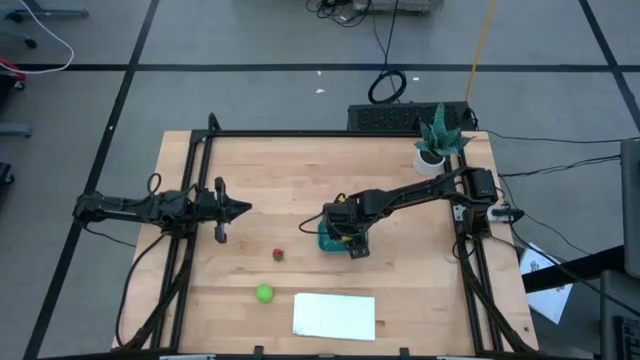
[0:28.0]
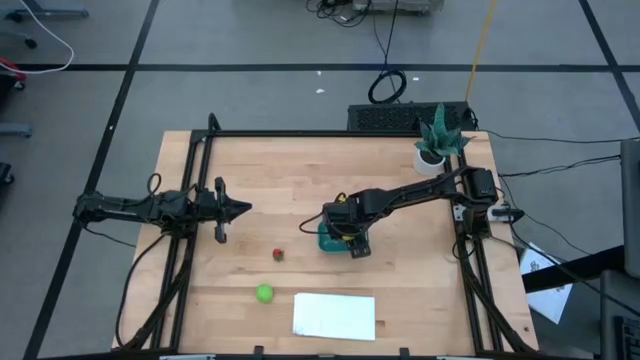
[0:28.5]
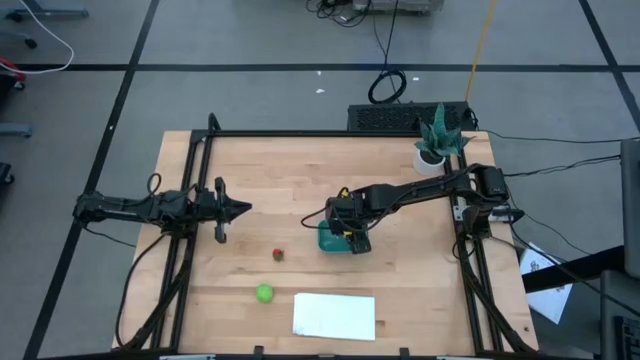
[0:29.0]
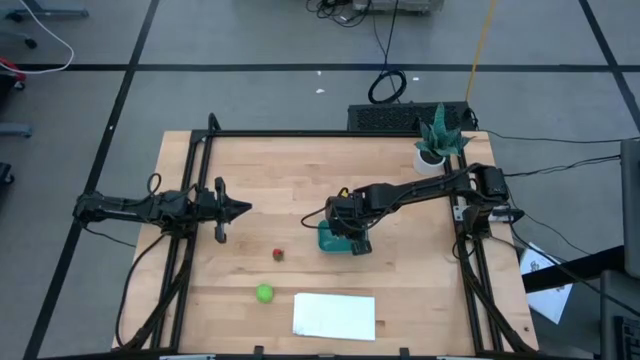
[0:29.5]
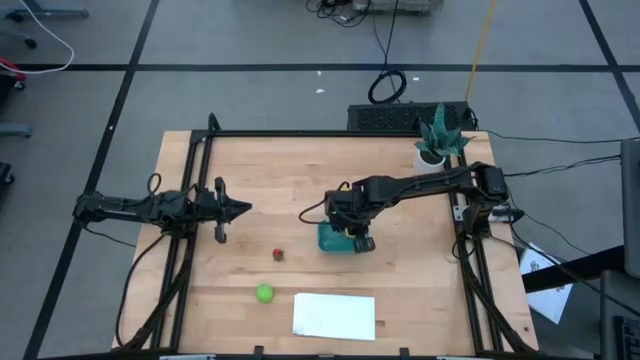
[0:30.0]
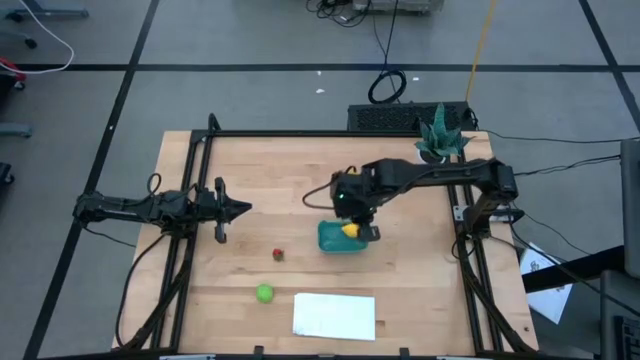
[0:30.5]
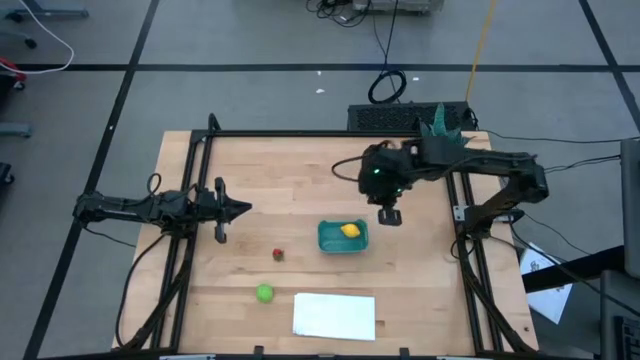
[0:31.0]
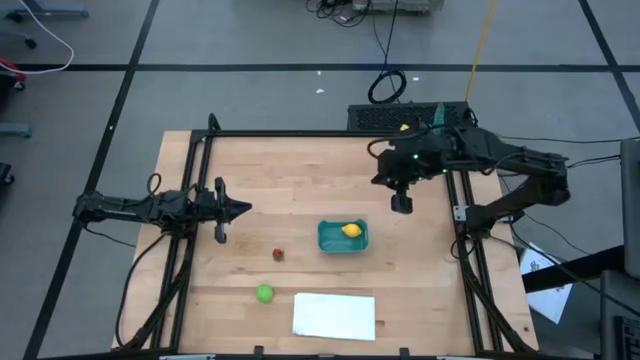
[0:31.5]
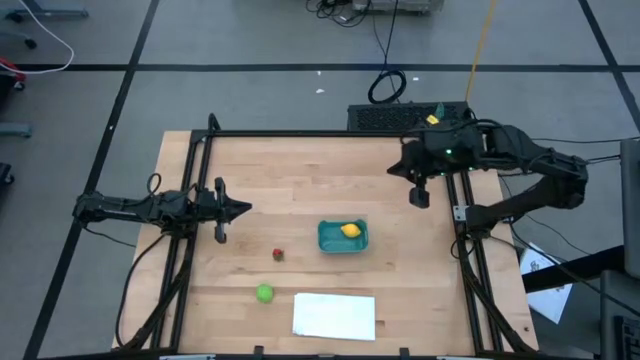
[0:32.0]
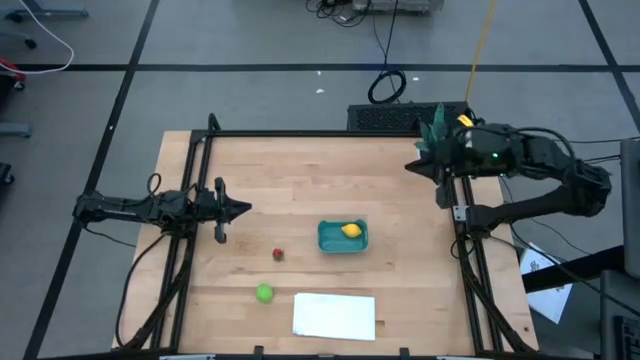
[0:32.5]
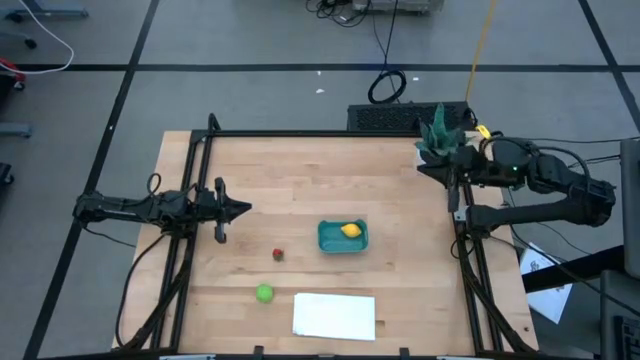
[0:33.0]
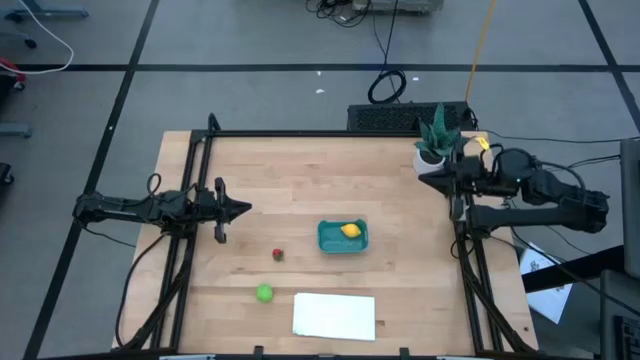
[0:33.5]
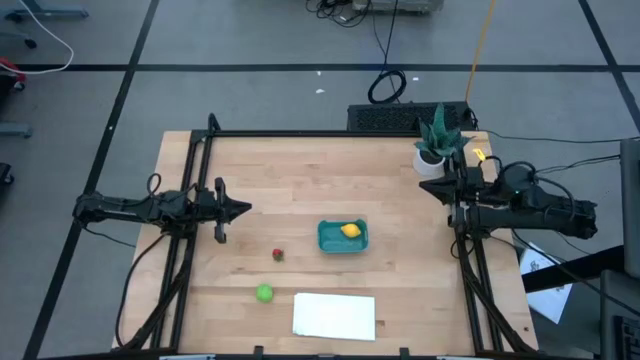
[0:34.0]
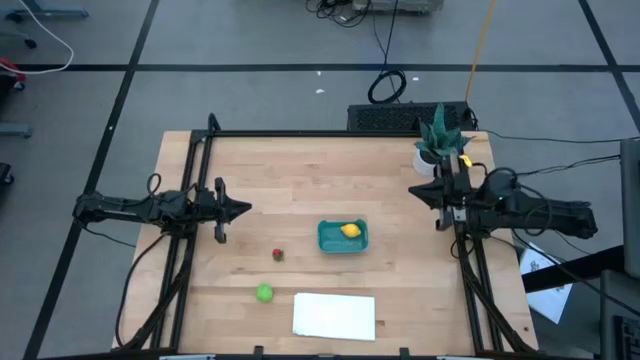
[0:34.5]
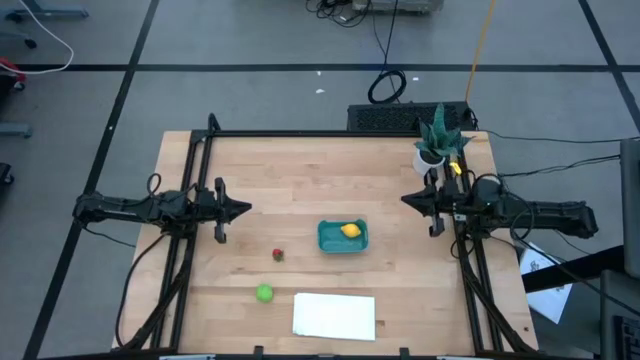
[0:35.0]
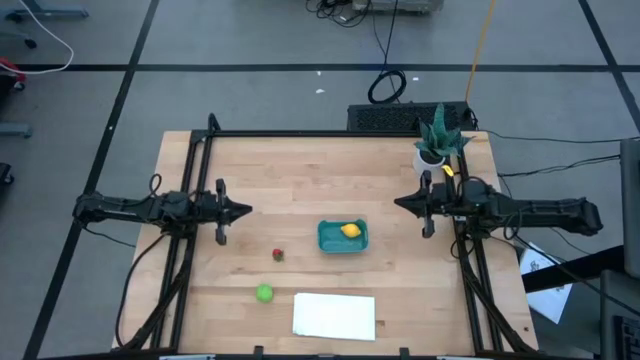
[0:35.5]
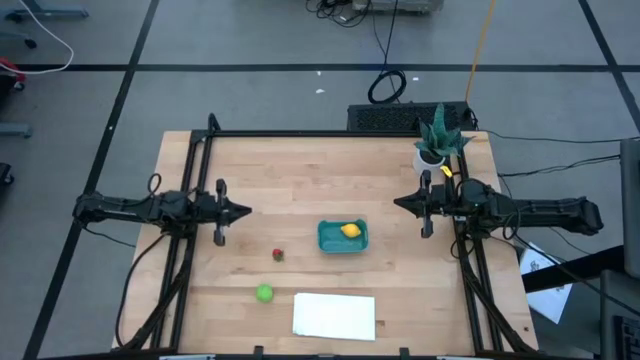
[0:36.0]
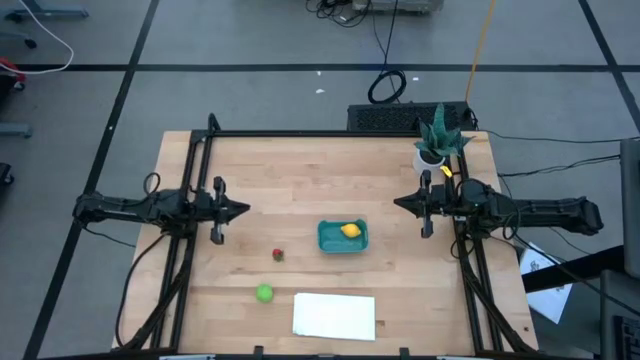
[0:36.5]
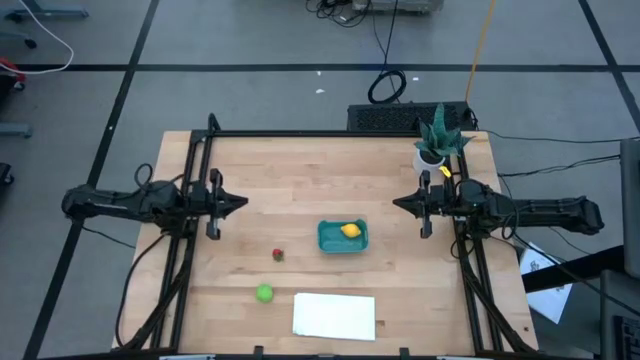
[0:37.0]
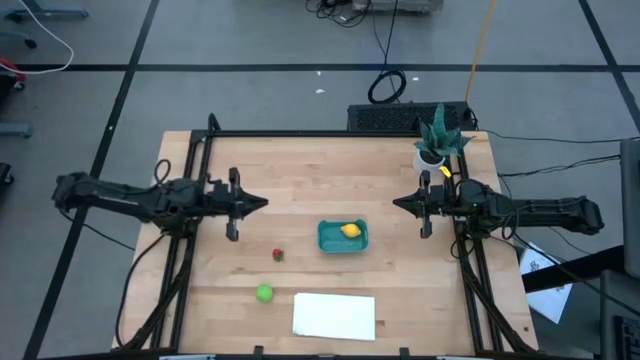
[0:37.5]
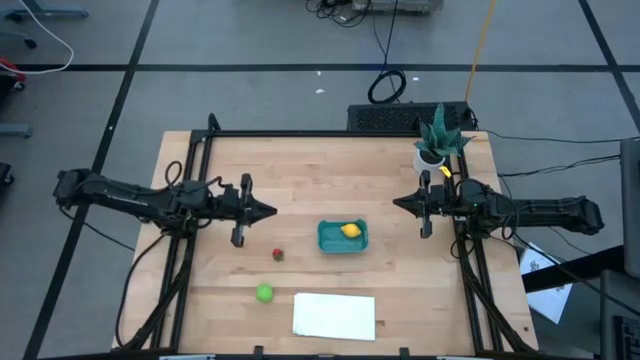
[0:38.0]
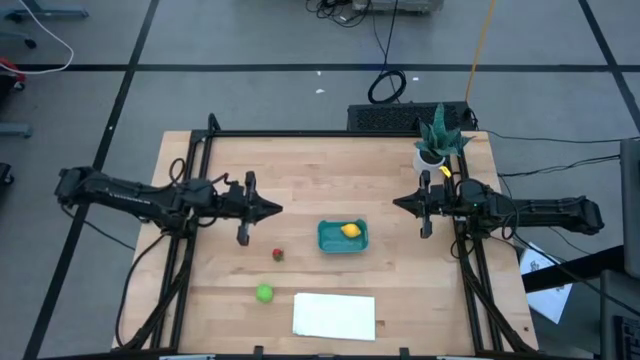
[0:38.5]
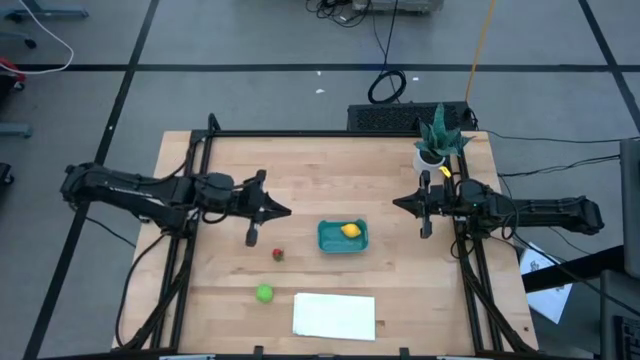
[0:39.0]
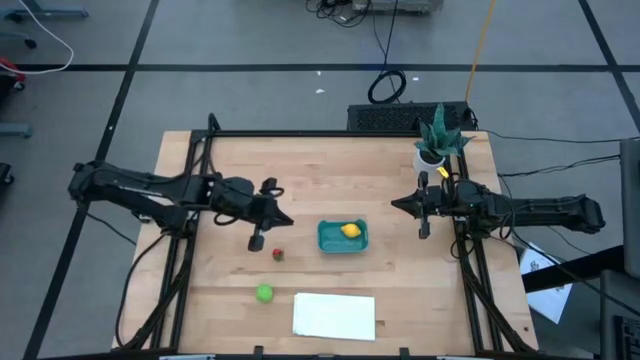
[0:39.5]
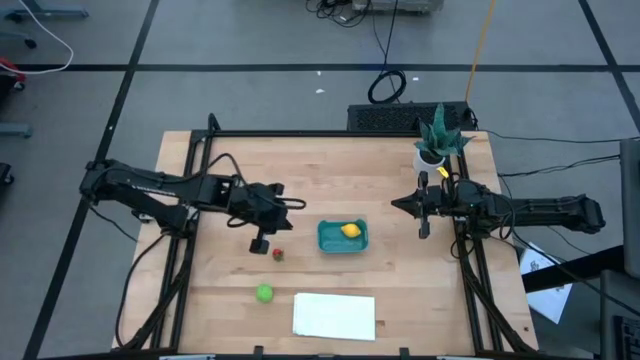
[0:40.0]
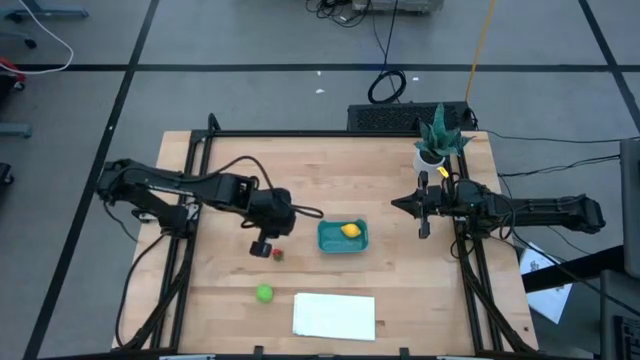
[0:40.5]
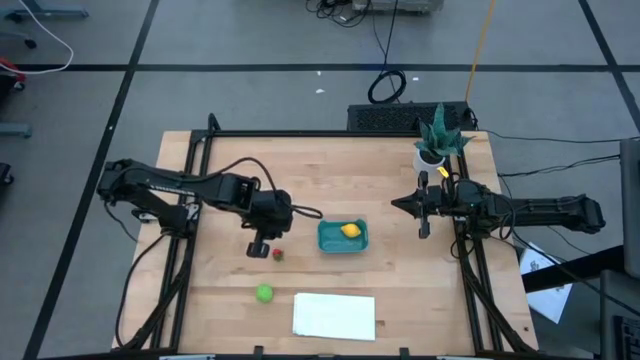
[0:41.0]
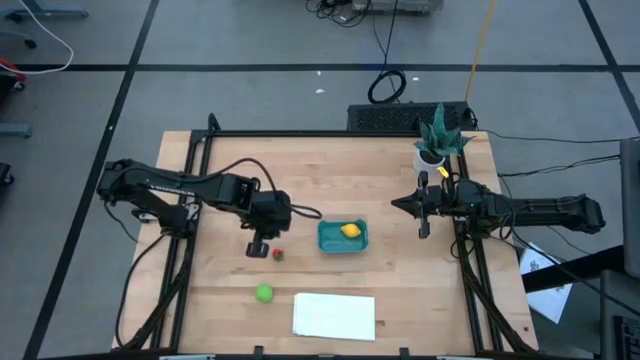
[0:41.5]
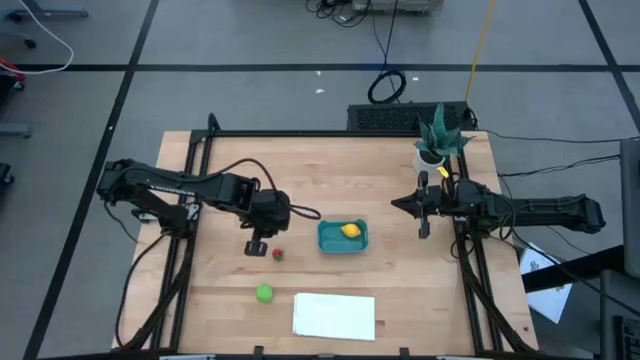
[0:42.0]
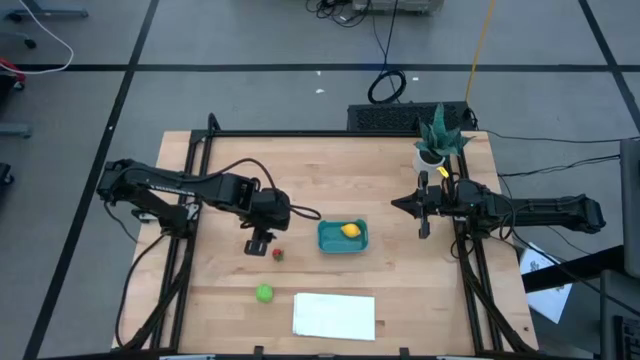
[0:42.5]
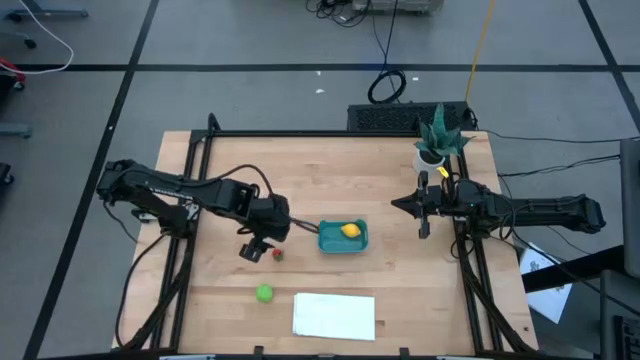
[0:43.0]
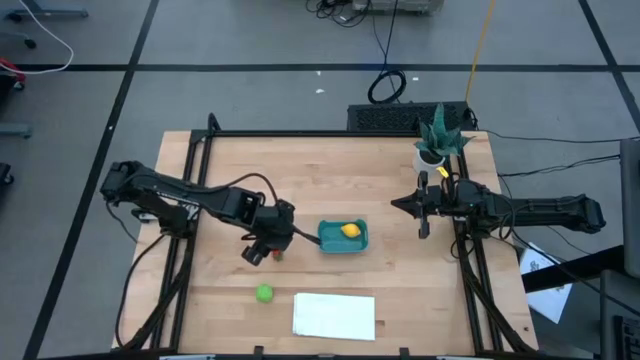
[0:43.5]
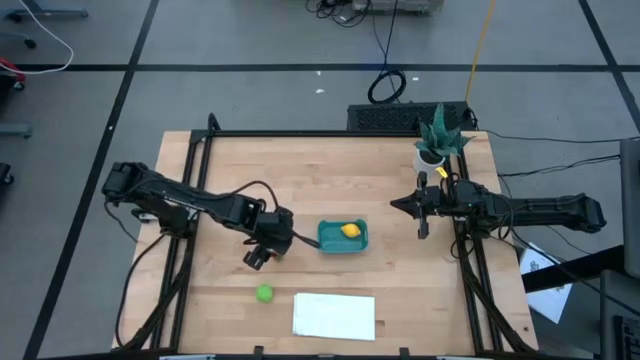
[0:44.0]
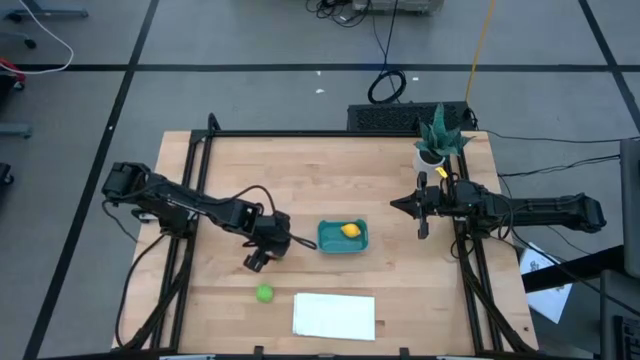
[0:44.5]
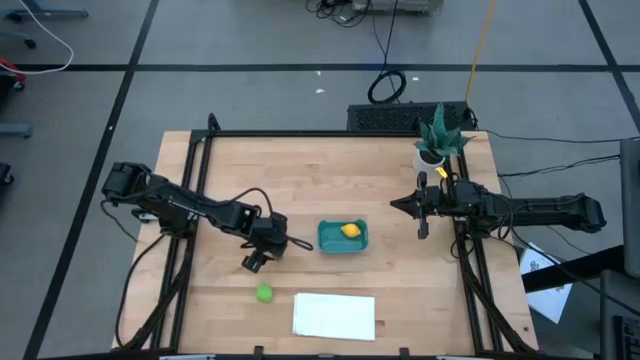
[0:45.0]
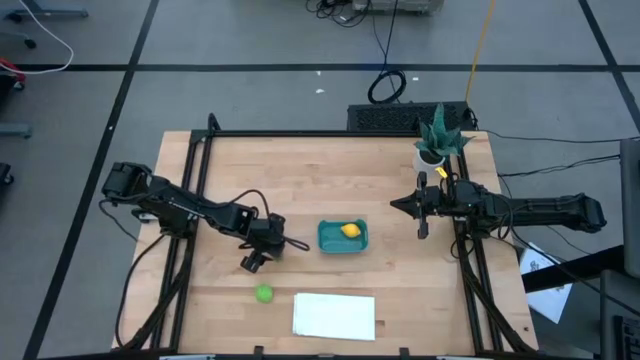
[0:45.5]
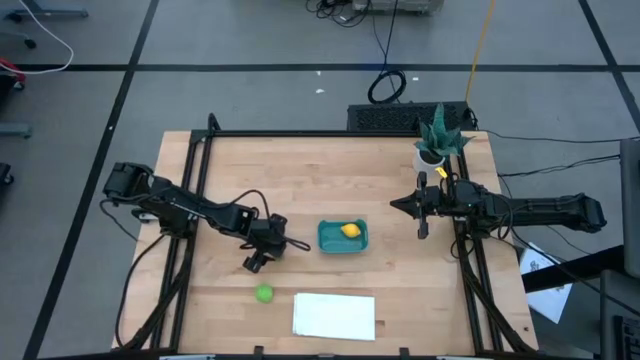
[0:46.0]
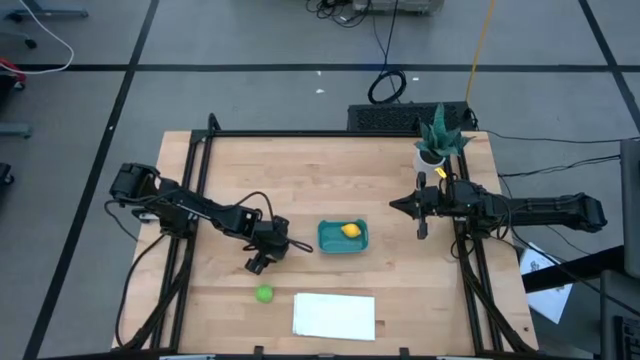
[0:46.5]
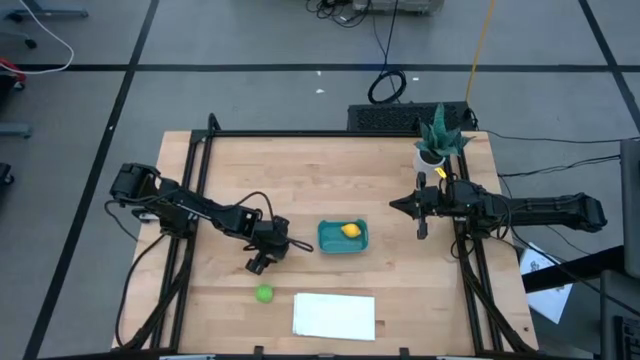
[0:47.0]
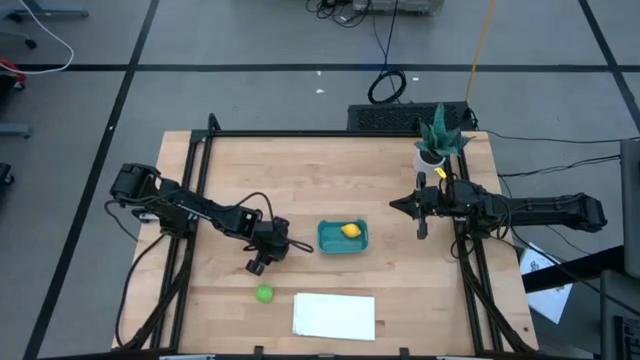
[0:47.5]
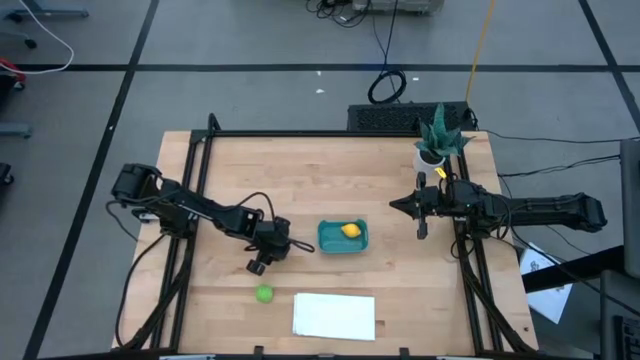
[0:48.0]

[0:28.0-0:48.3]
Task: Pick and placing Produce into tupperware
Put the red strawberry into the blue bin
